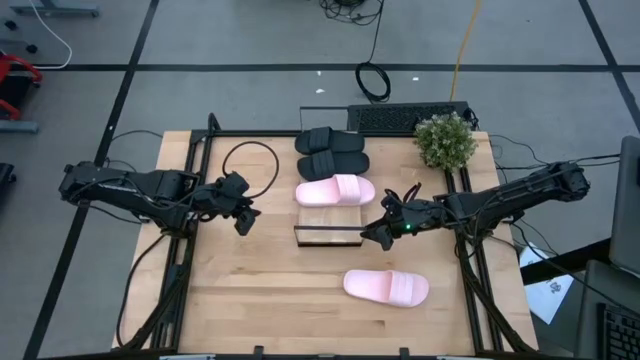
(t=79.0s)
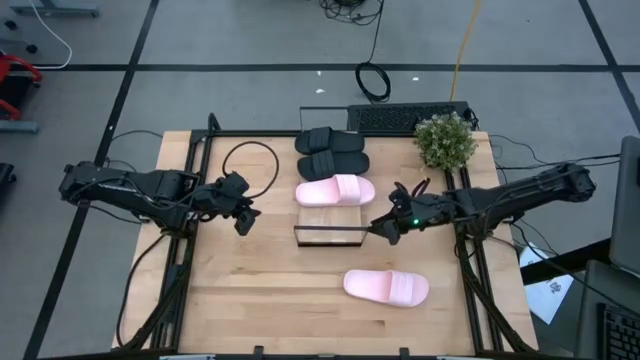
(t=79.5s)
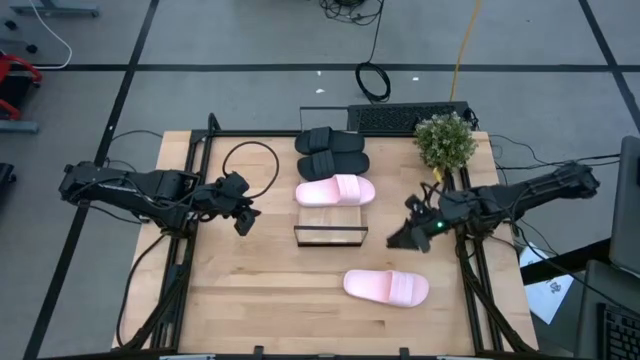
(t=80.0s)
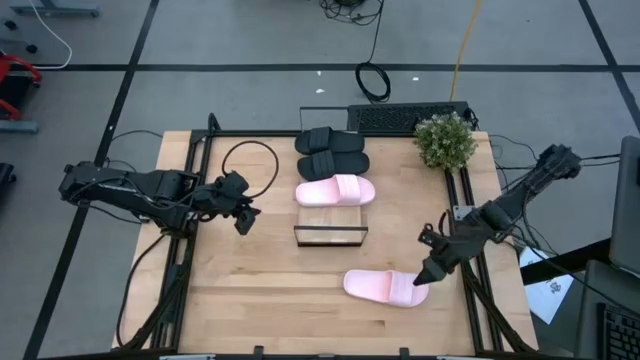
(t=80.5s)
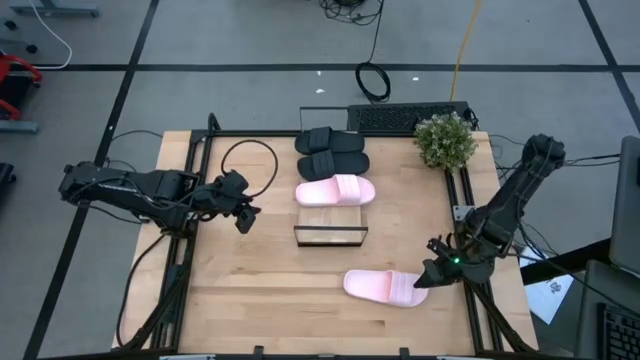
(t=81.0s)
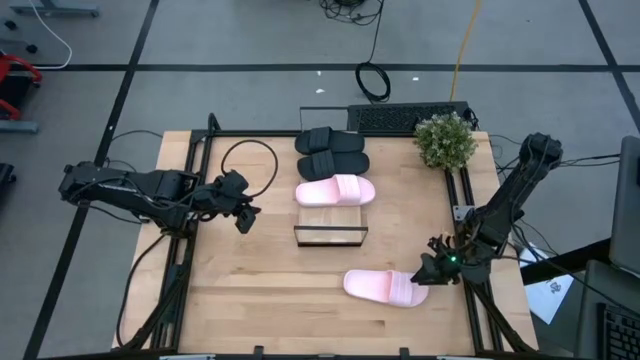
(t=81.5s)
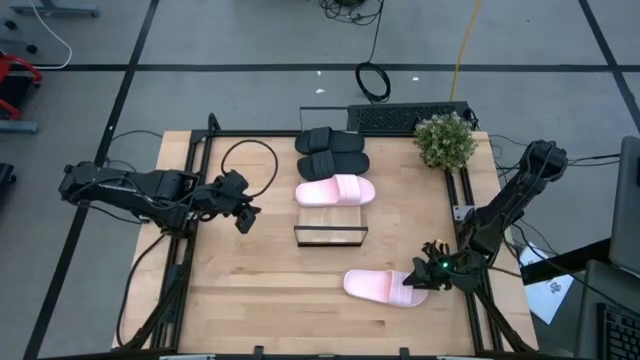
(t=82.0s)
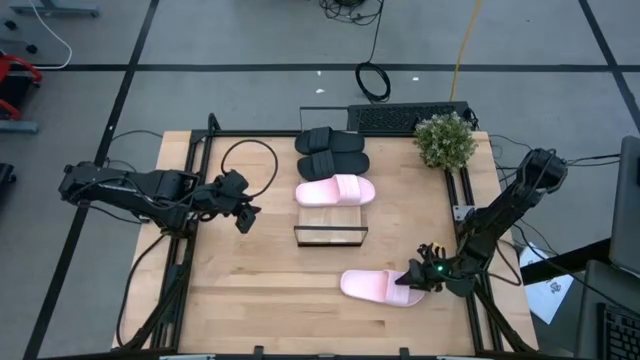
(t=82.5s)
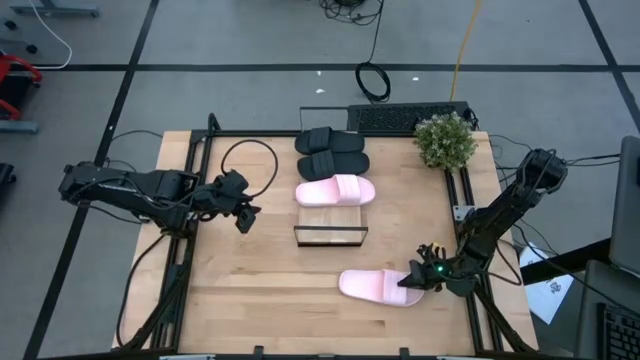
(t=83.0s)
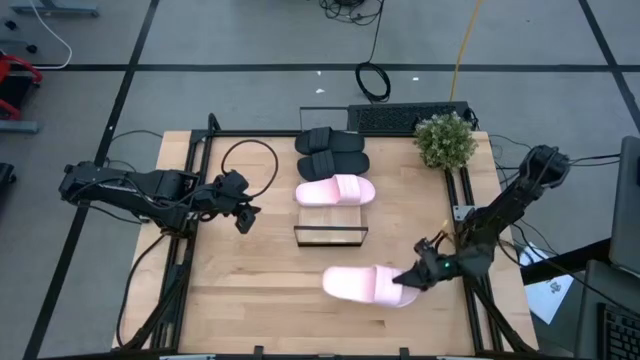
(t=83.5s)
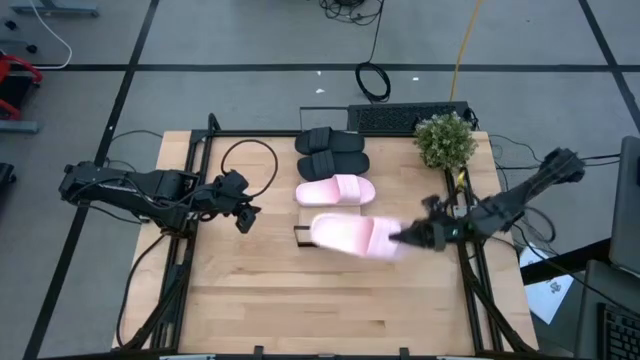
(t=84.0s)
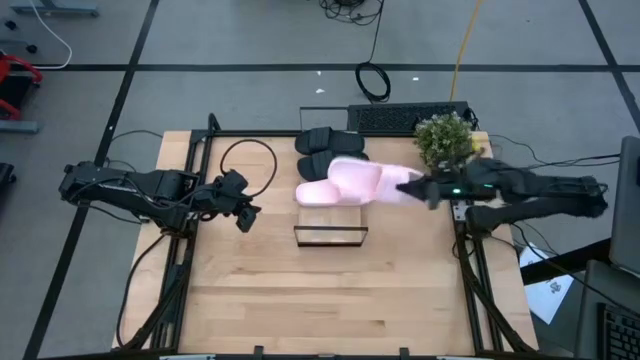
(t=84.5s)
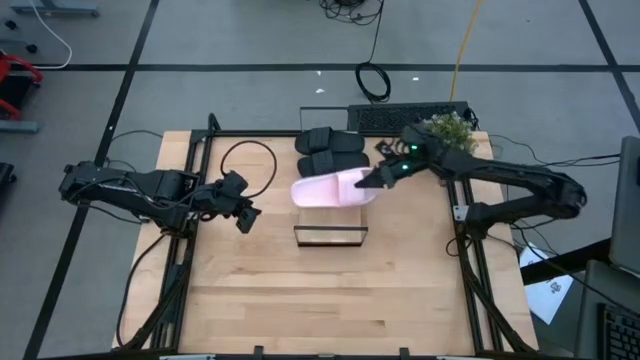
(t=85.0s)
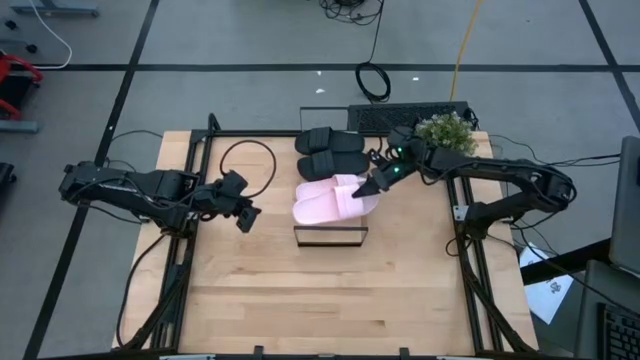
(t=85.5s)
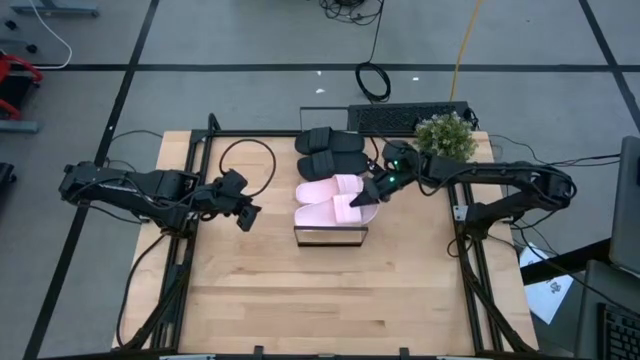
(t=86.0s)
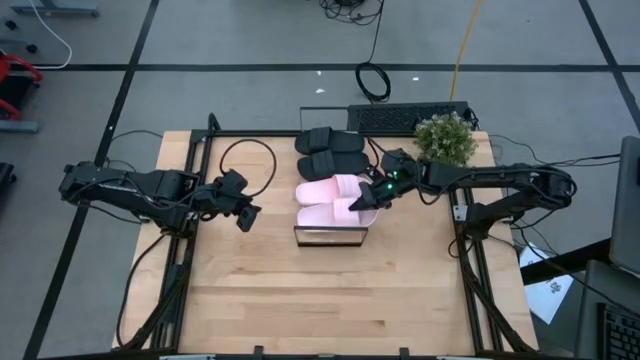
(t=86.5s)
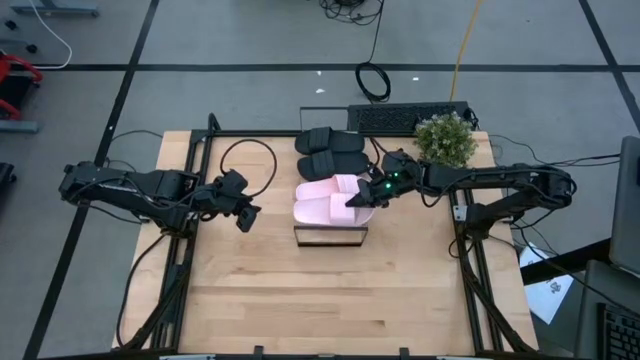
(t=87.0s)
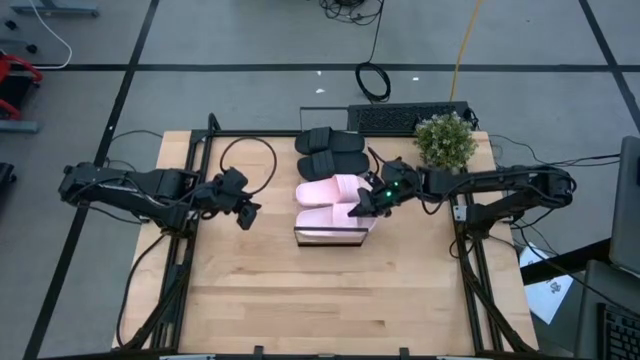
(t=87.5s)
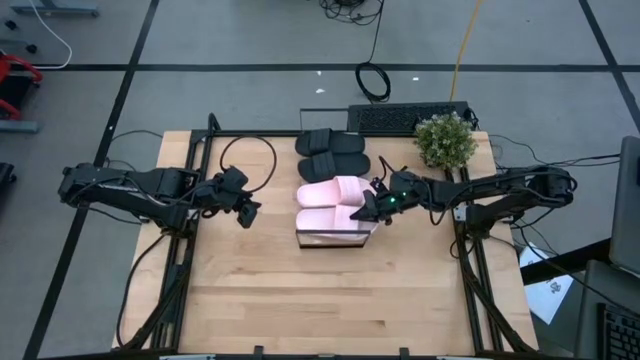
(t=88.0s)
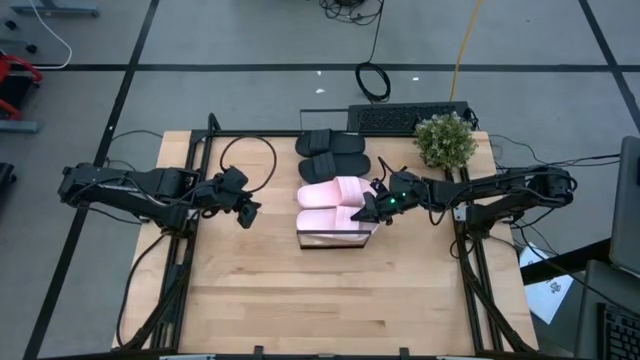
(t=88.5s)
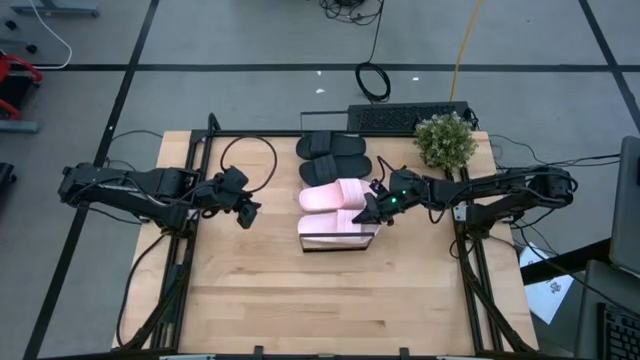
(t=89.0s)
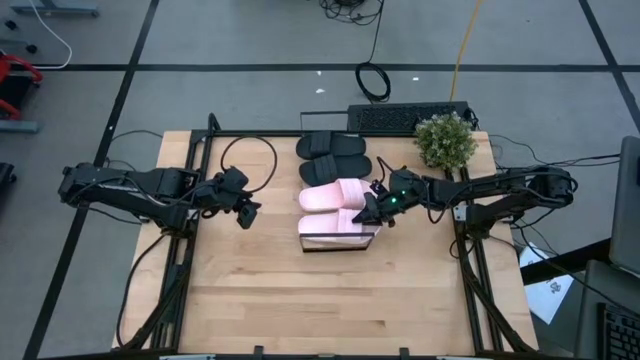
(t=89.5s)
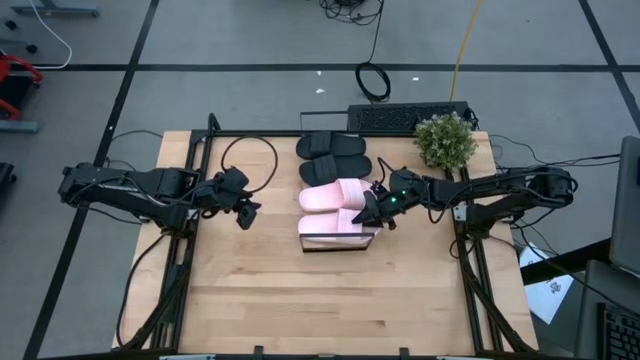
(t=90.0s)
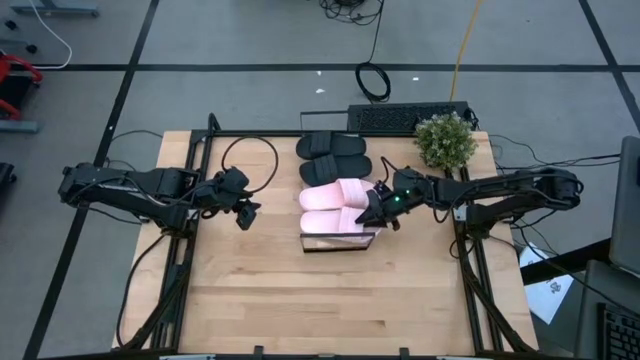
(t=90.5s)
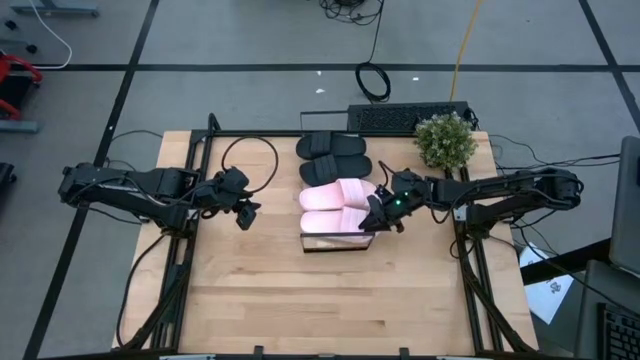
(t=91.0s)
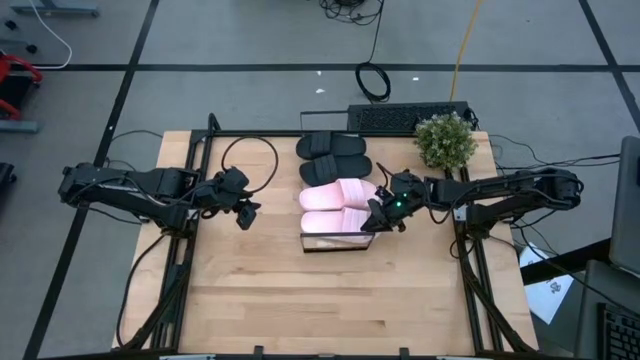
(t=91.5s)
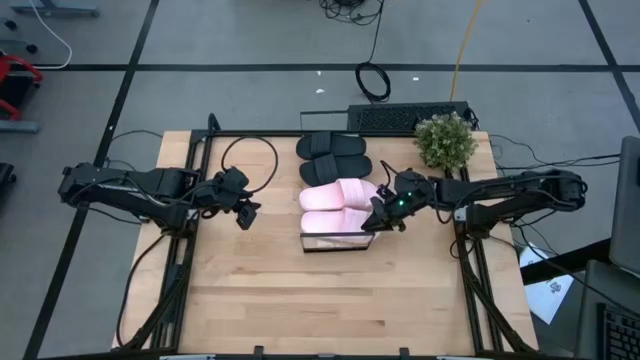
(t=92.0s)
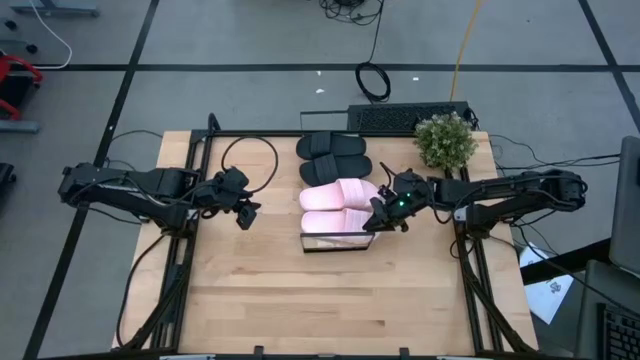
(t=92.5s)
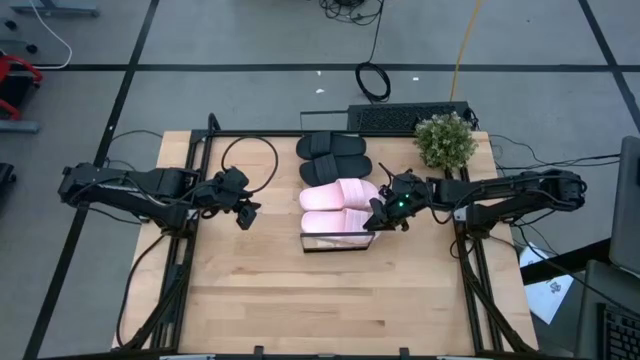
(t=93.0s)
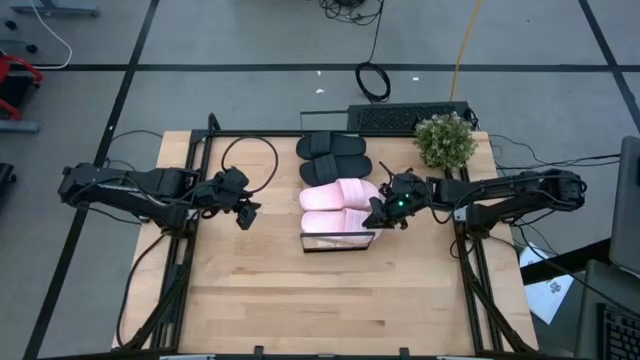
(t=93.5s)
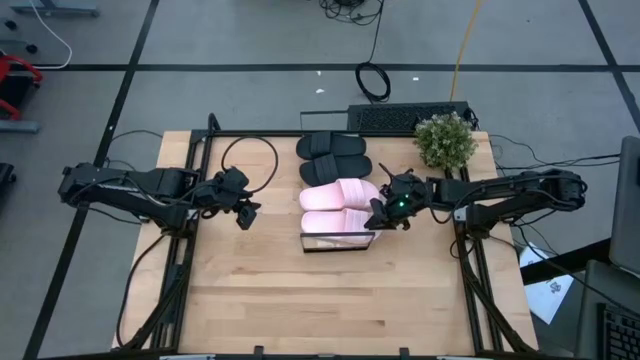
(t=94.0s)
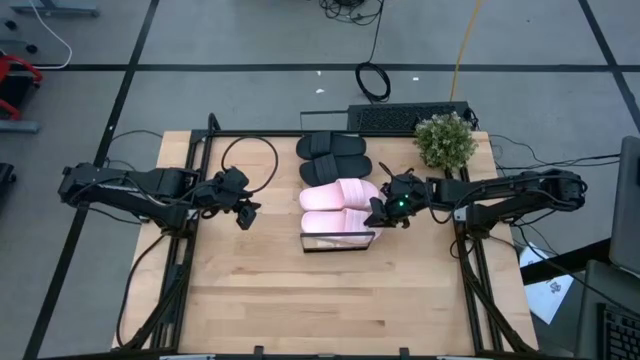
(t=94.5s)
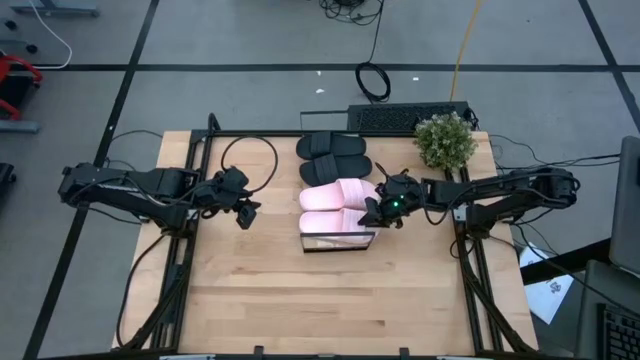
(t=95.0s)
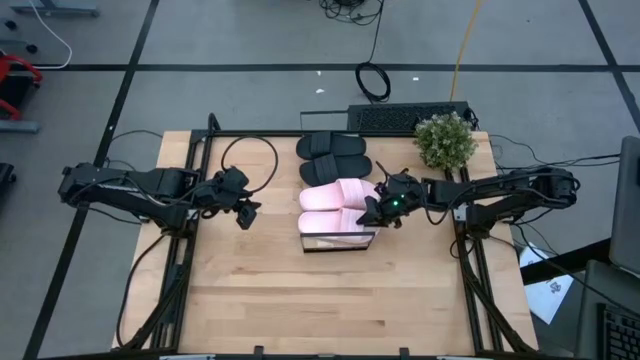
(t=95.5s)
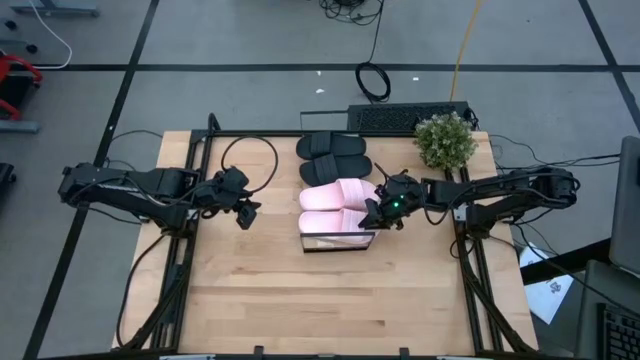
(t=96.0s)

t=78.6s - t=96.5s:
Task: Pick and place slides into the shelf
Put the pink slides on the shelf

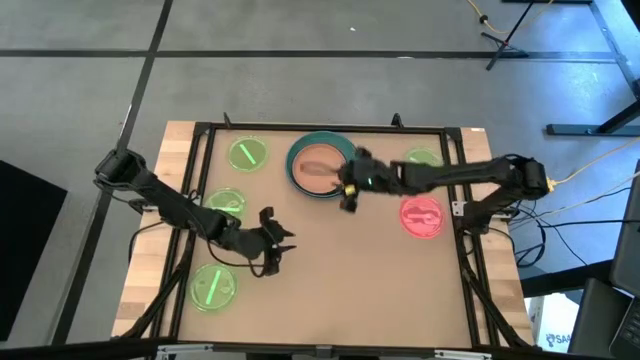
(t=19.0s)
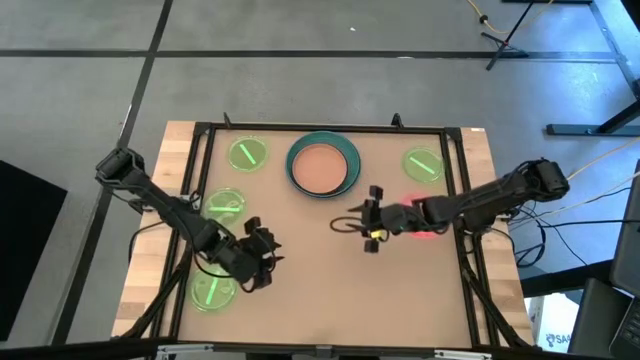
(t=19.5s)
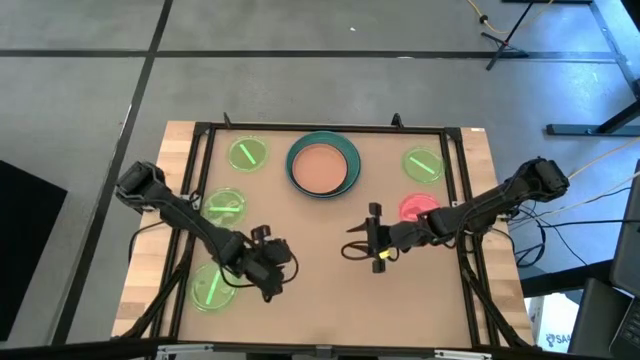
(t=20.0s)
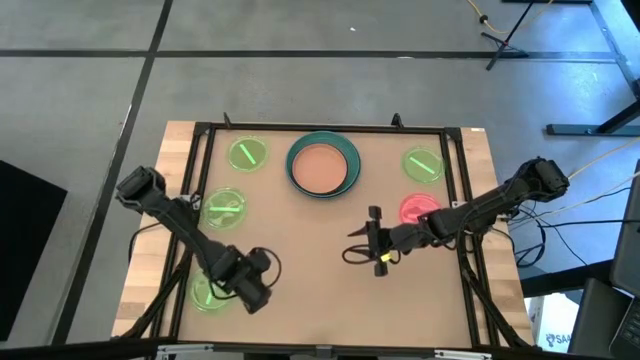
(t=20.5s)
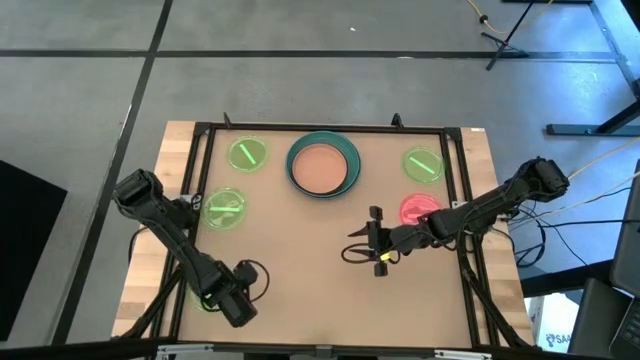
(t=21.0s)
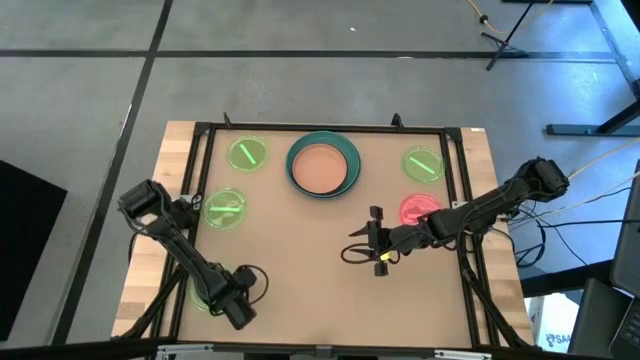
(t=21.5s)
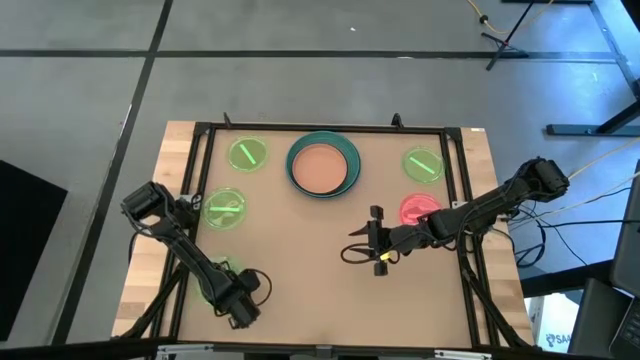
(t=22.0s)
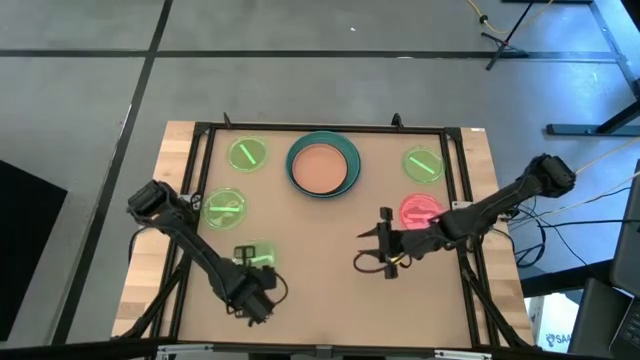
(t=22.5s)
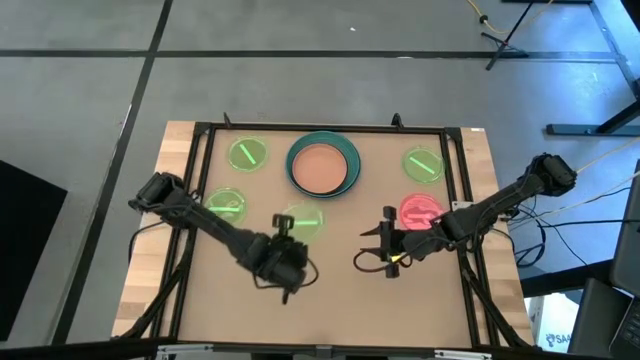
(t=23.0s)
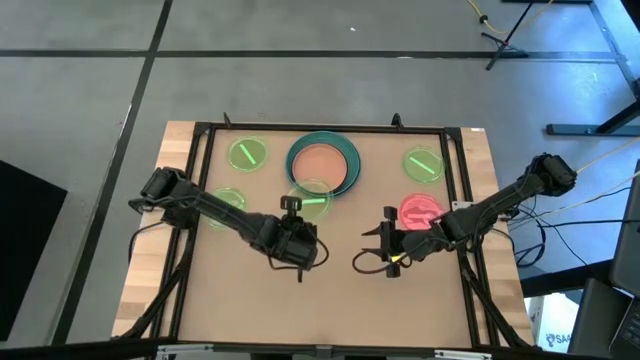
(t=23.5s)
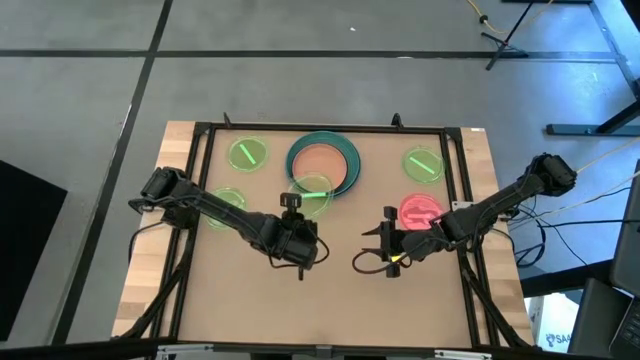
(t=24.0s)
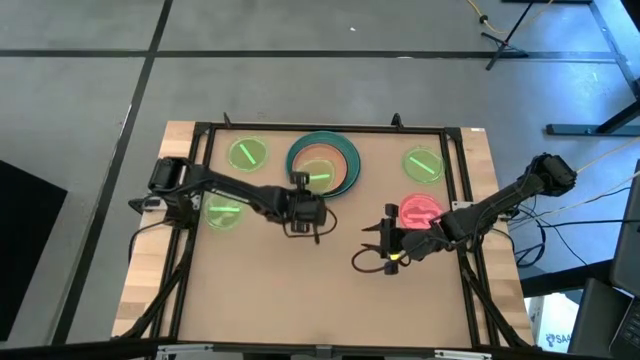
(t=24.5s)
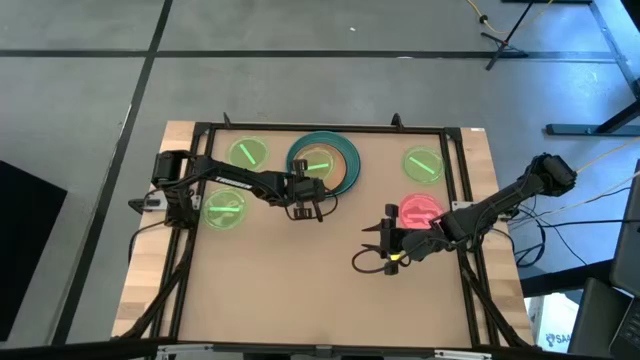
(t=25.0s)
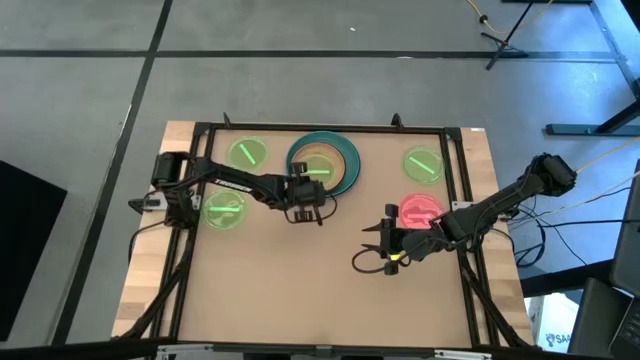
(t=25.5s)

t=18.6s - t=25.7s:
Task: Stack plastic plates
Stack the light green plate on top of the orange plate
